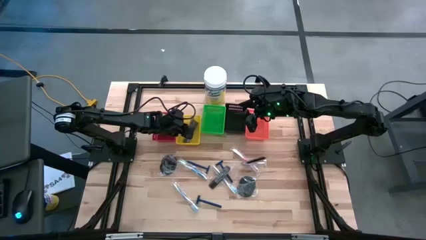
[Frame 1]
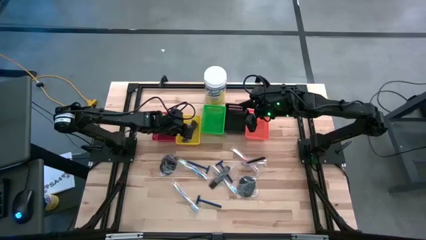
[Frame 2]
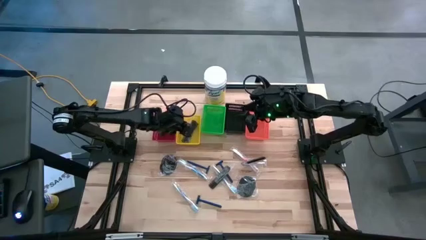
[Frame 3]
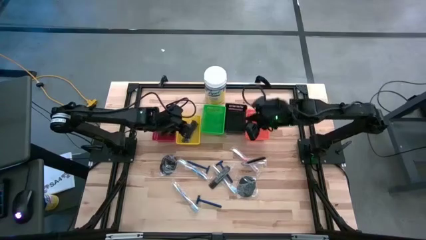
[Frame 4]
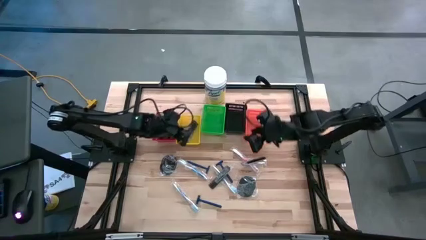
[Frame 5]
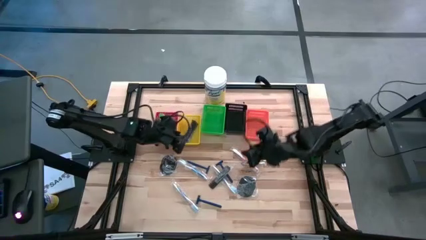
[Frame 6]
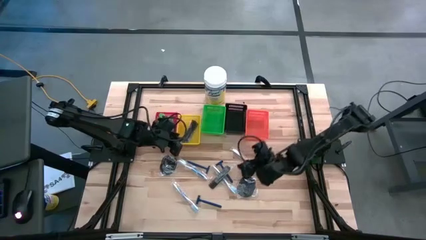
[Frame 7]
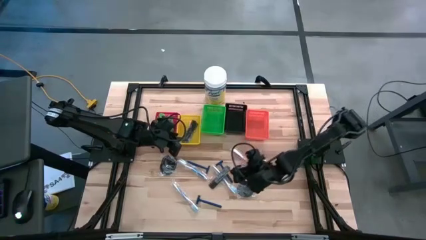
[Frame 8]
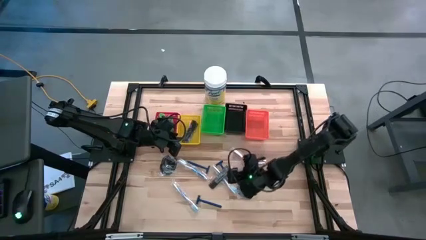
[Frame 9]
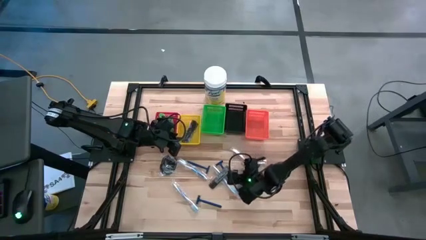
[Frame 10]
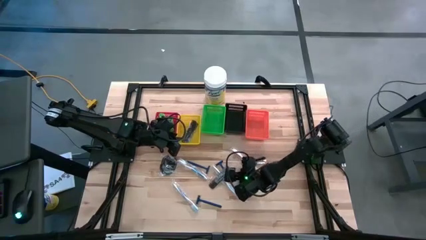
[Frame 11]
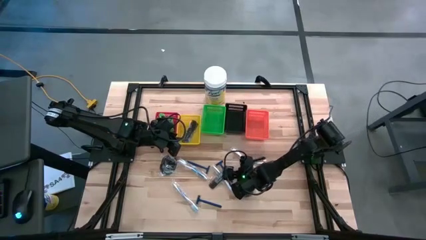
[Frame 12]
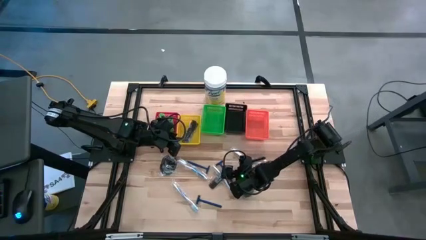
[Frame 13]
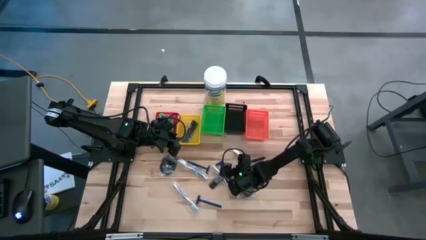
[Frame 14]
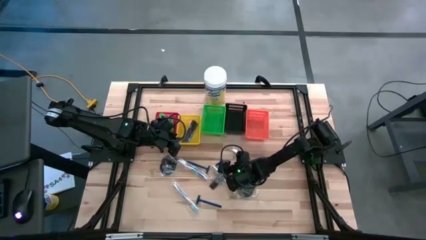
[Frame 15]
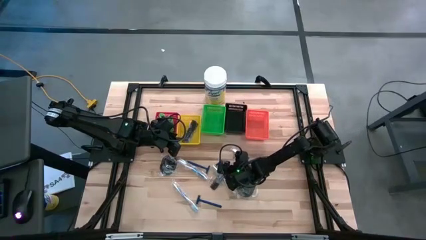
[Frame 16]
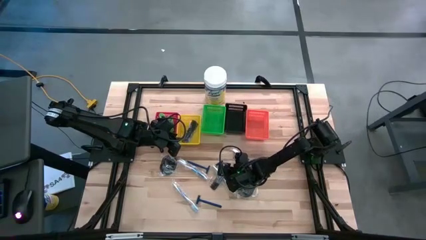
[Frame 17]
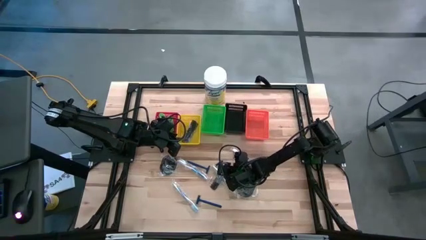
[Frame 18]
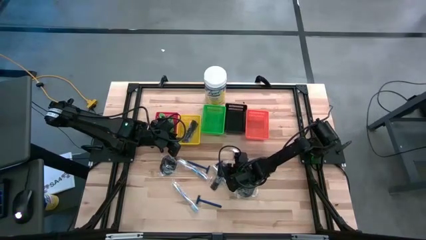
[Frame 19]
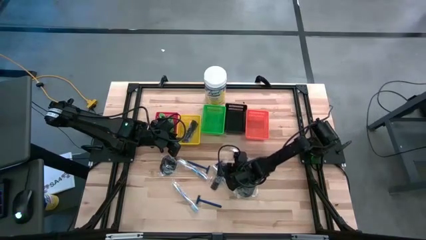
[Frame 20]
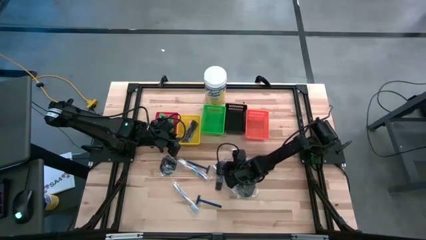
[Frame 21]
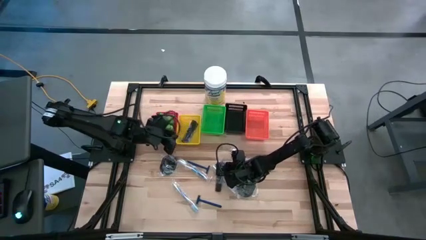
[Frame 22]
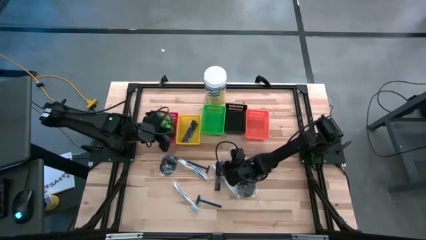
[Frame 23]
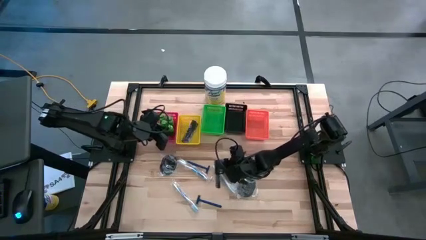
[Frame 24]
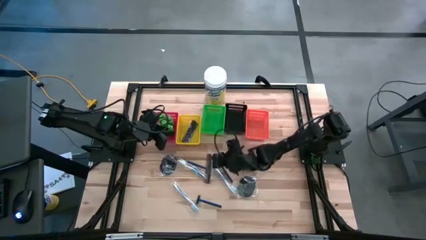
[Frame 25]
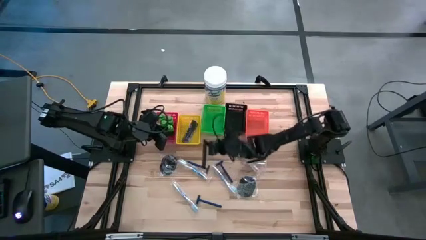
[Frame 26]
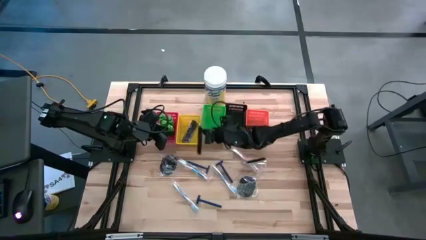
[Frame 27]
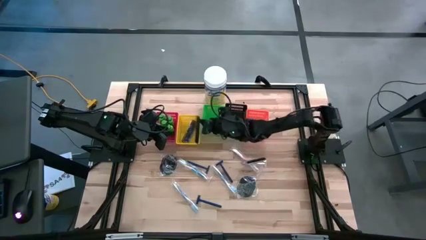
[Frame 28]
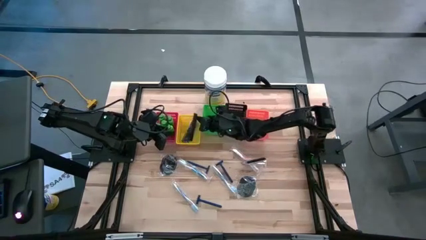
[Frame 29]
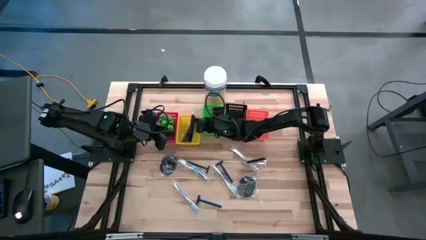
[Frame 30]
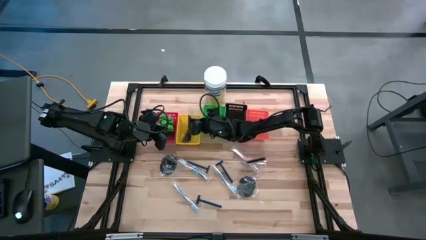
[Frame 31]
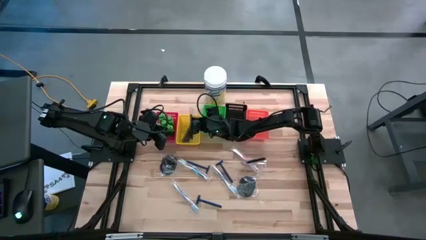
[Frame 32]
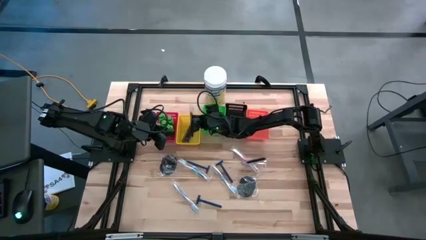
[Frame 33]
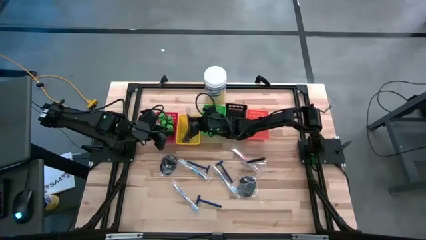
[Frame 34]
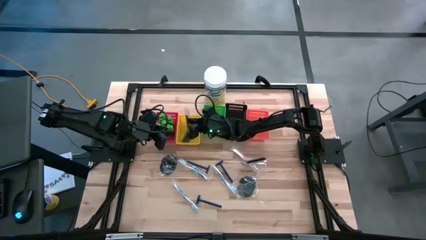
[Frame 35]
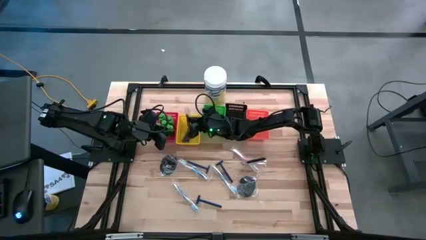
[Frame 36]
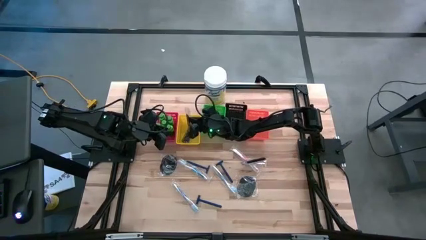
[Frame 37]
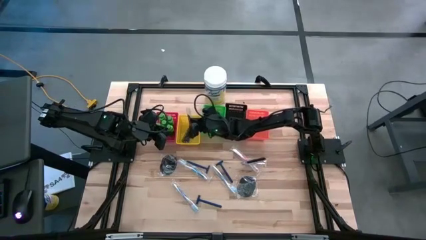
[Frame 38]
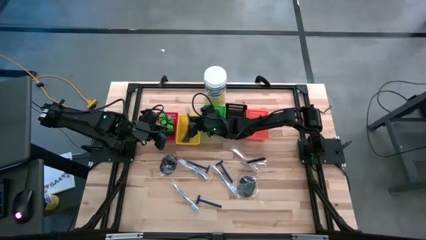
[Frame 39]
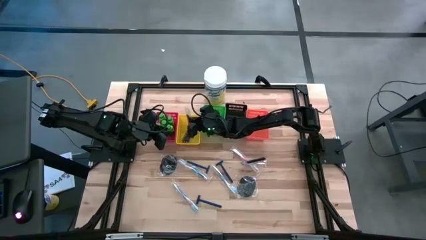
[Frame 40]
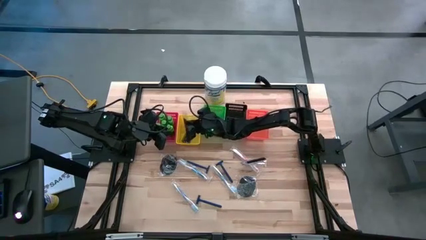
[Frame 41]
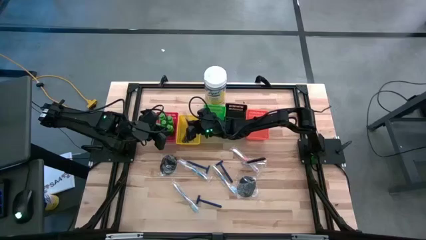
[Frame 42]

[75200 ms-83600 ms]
Task: Pick & Place Travel size toiletries
Put the black hair comb into the yellow bin

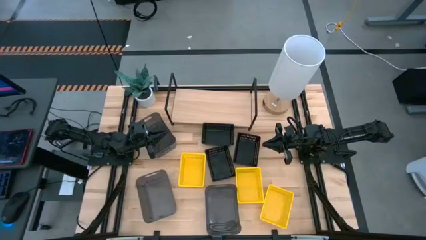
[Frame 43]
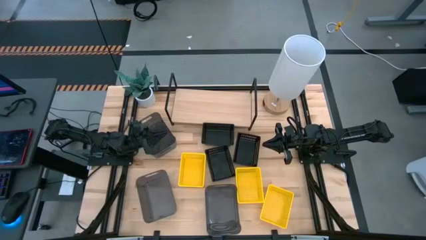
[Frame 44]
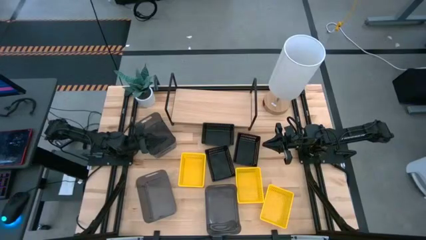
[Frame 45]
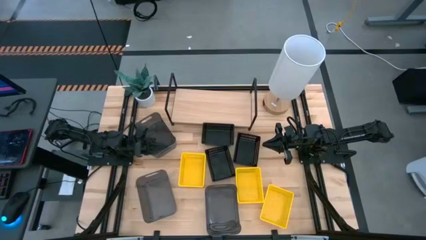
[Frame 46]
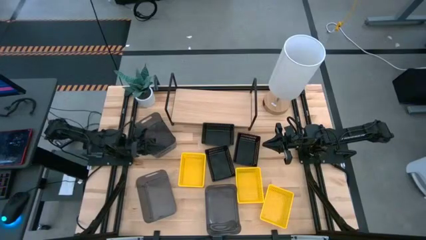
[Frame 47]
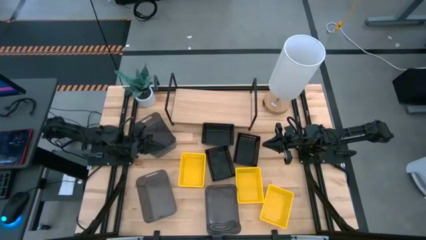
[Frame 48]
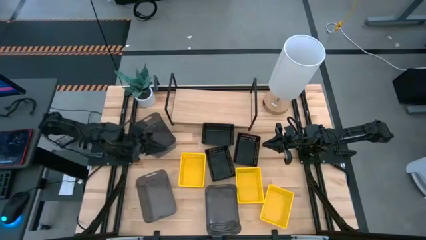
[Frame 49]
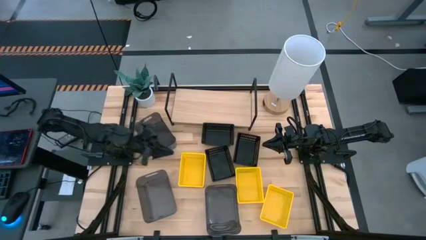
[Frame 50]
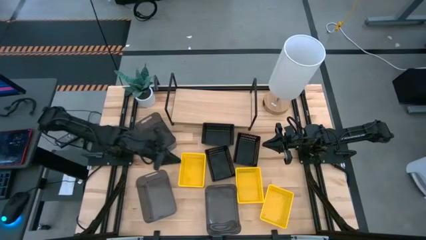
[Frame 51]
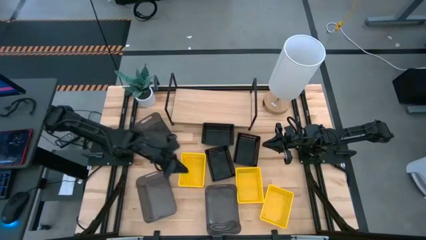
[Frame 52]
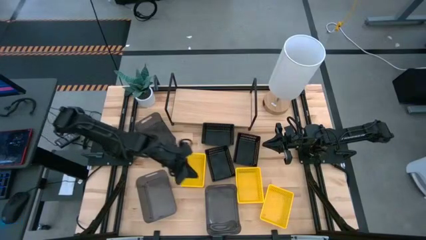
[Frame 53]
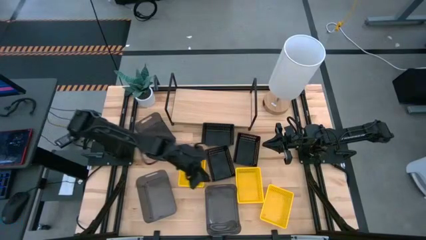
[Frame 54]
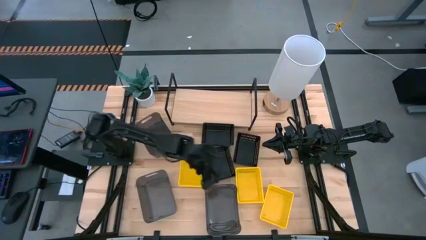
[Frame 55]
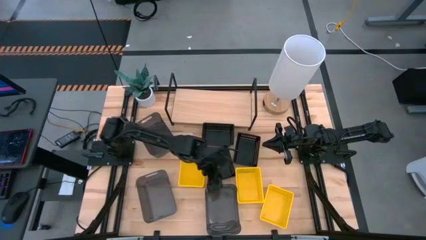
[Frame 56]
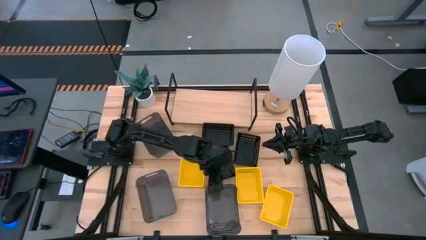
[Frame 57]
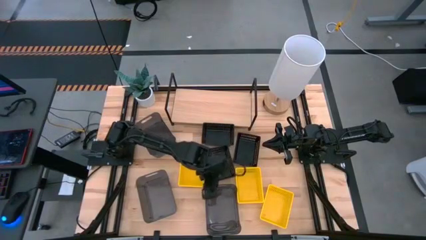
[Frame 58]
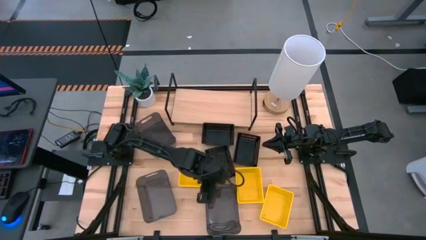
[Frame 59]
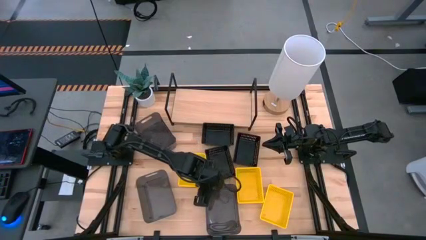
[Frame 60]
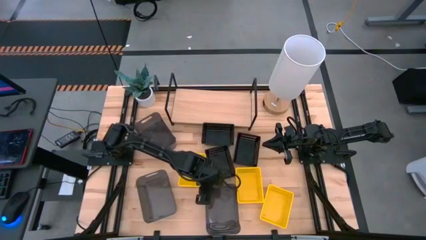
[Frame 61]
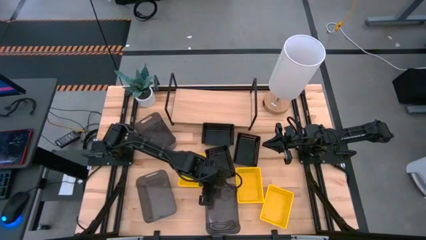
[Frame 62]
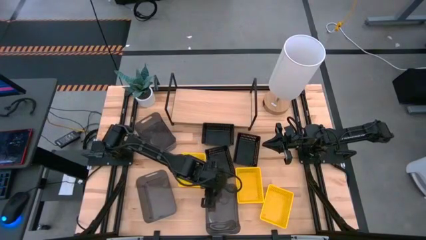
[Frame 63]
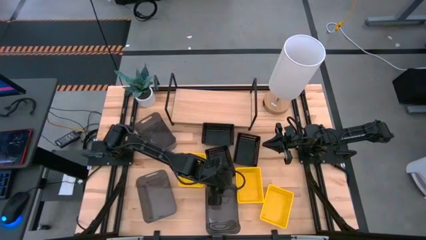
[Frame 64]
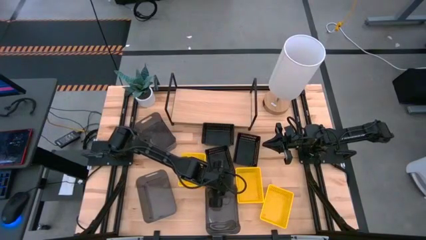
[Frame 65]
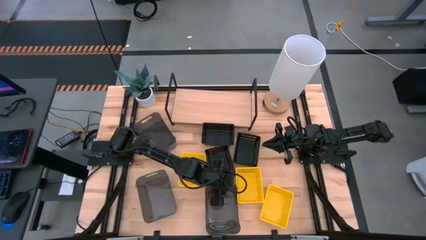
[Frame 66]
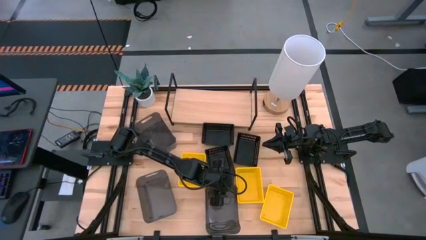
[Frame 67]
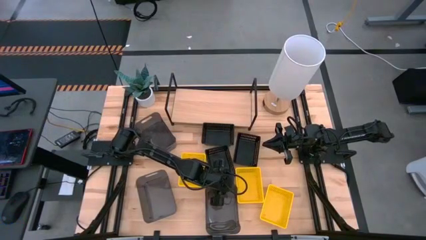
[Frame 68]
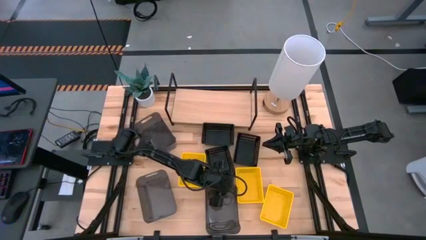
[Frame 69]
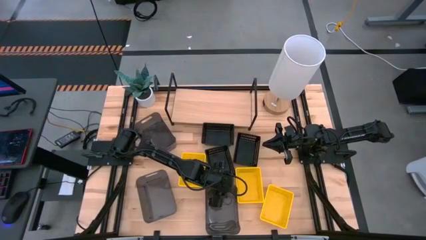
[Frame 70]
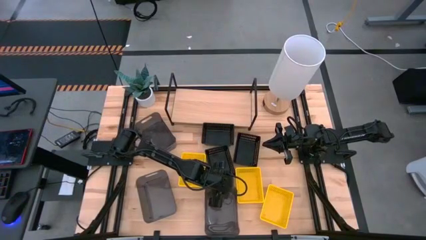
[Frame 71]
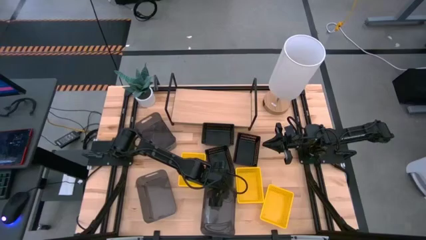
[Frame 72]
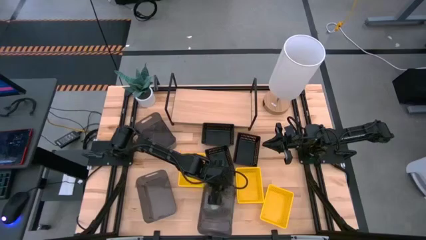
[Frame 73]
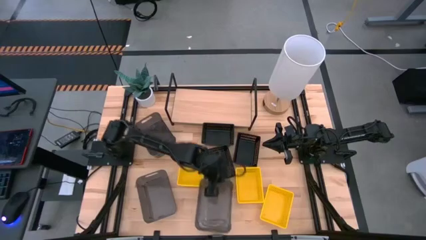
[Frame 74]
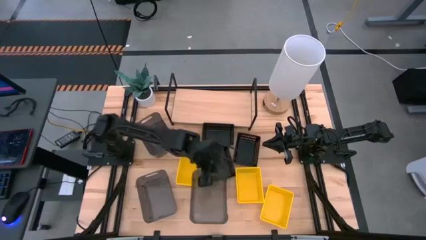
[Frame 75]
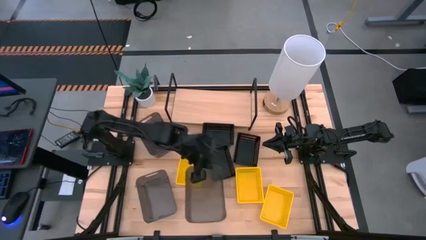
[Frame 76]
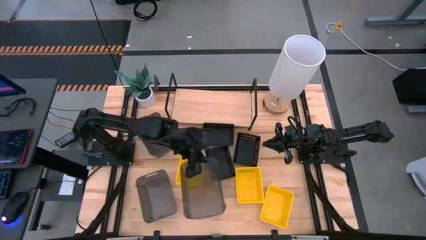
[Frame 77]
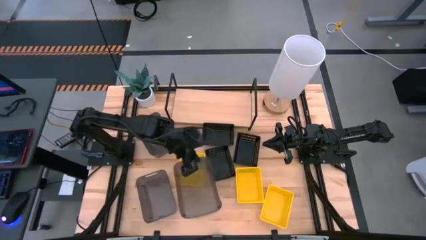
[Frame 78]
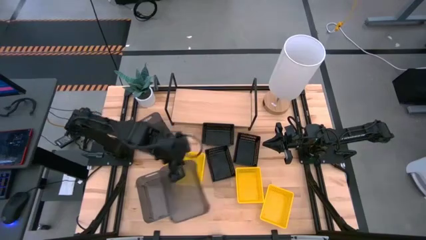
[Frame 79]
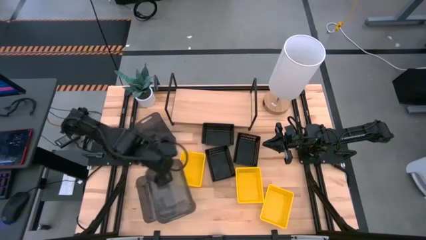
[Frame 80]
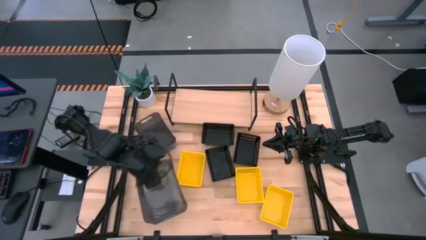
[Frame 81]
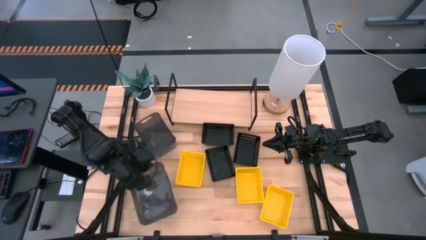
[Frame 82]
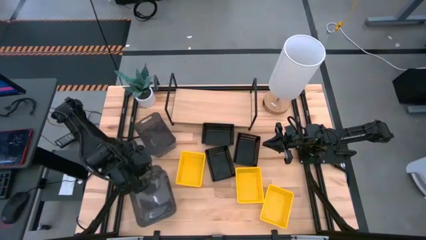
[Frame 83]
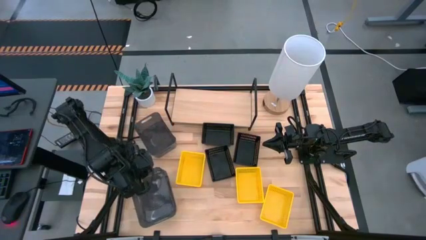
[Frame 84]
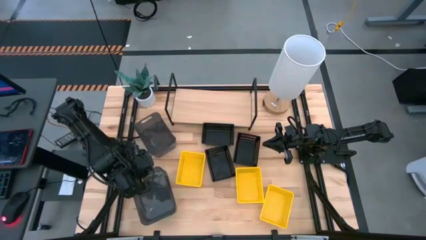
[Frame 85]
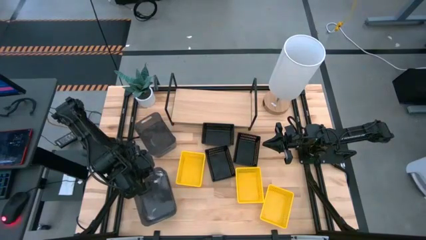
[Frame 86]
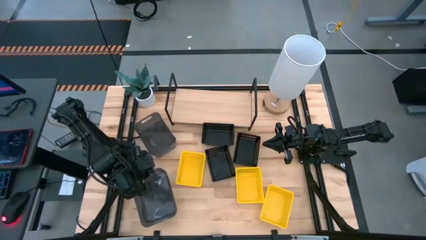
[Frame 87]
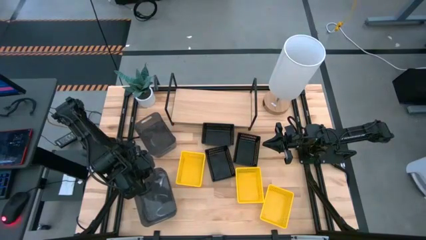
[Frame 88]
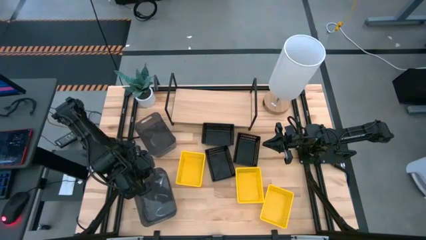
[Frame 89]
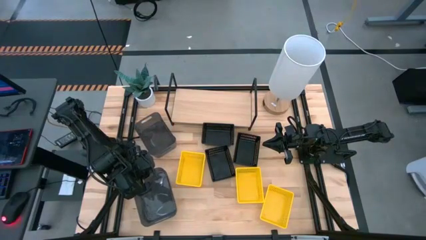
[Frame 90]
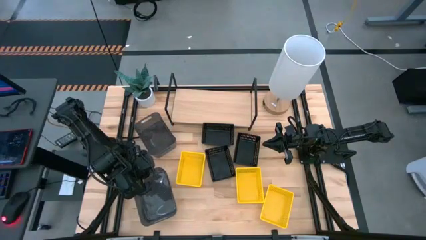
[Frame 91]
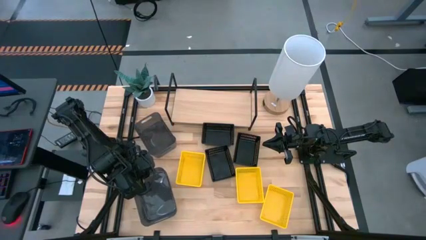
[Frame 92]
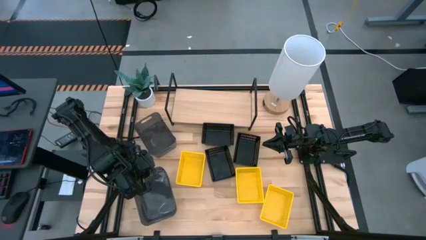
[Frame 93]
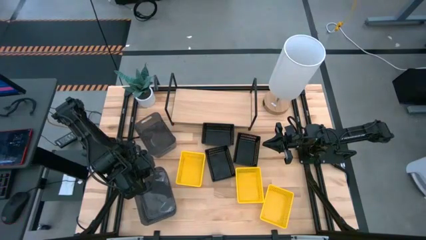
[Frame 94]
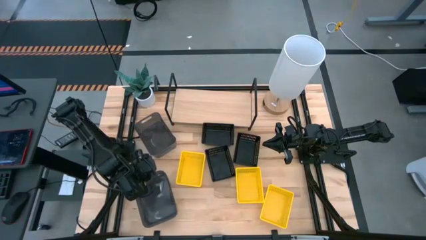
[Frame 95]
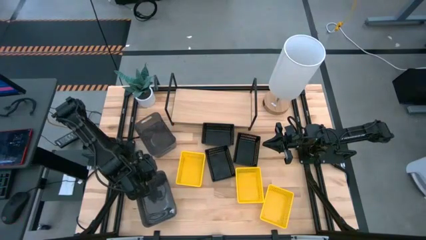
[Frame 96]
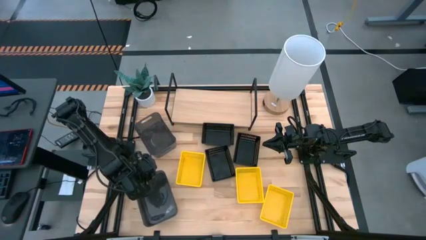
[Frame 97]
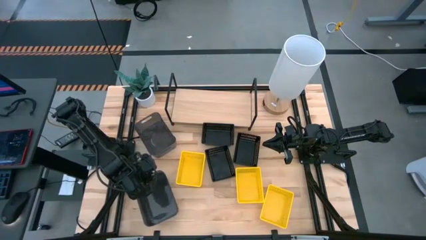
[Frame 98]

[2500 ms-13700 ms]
Task: Stack baskets on shelf by color
Stack the right black bin on top of the left black bin
